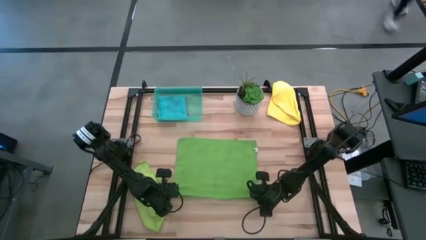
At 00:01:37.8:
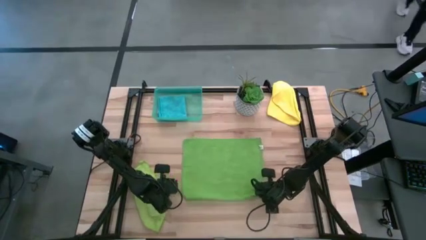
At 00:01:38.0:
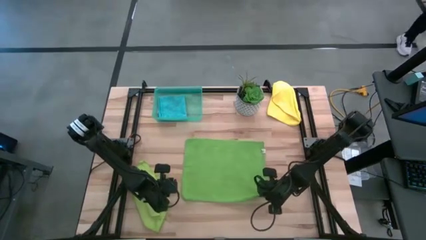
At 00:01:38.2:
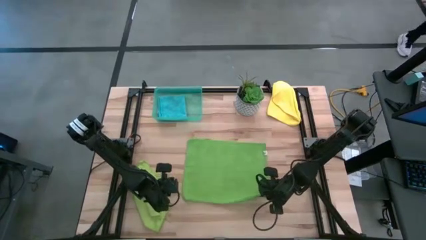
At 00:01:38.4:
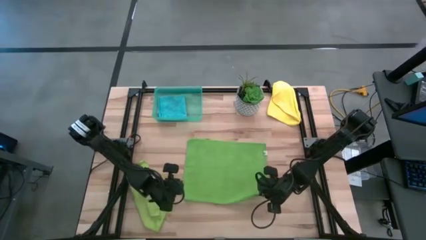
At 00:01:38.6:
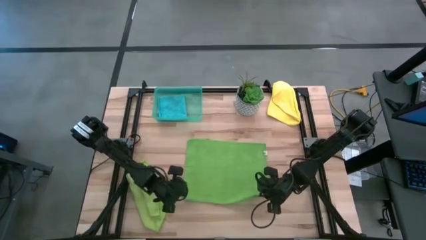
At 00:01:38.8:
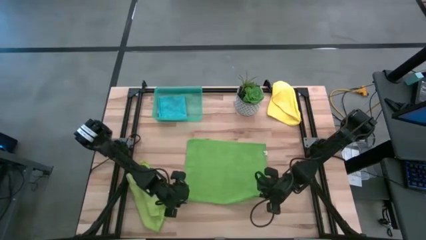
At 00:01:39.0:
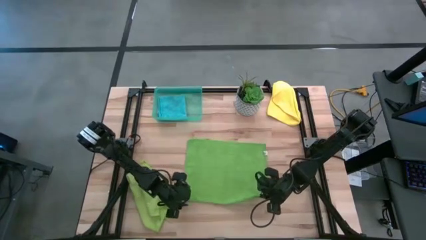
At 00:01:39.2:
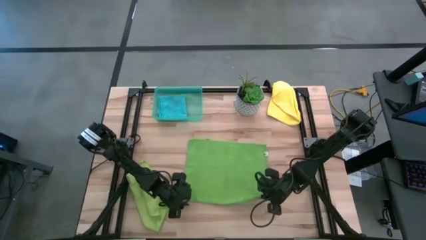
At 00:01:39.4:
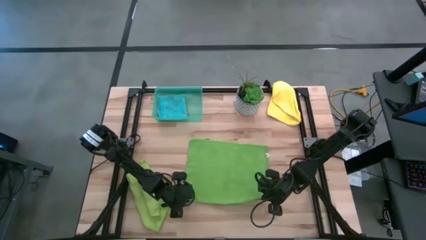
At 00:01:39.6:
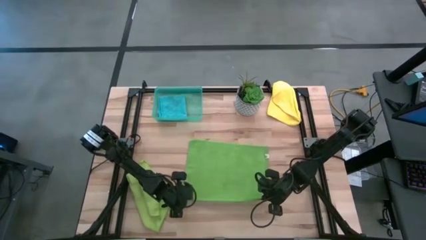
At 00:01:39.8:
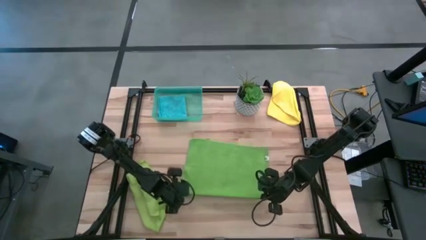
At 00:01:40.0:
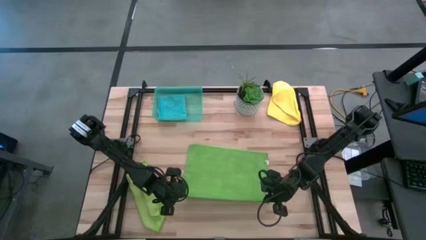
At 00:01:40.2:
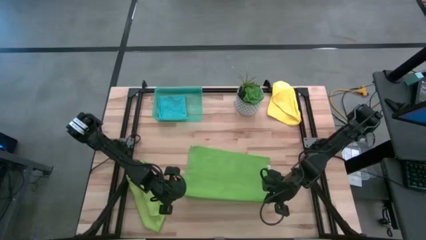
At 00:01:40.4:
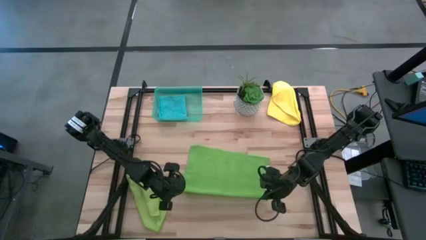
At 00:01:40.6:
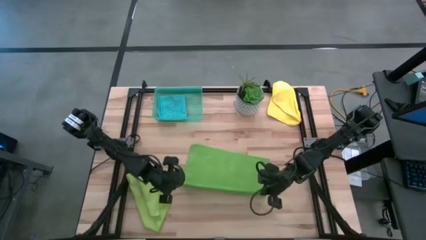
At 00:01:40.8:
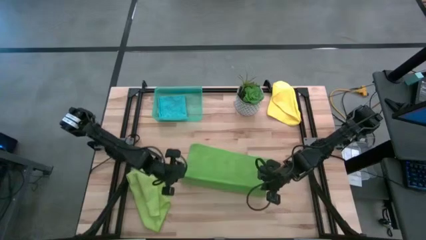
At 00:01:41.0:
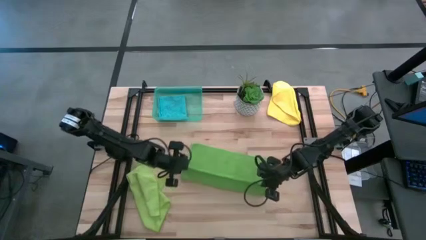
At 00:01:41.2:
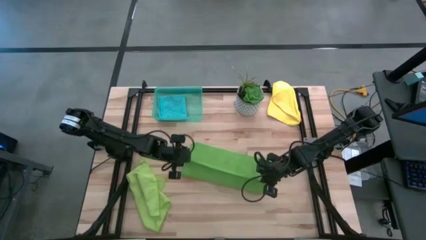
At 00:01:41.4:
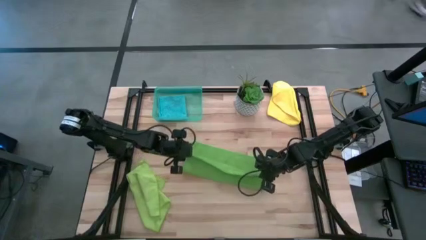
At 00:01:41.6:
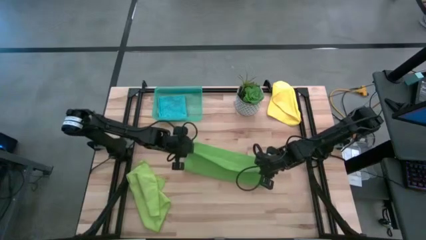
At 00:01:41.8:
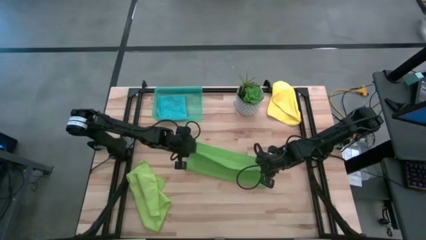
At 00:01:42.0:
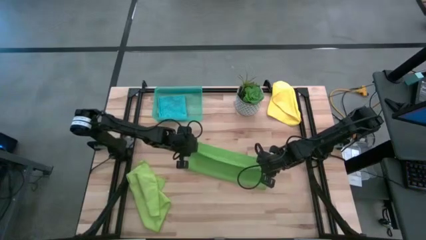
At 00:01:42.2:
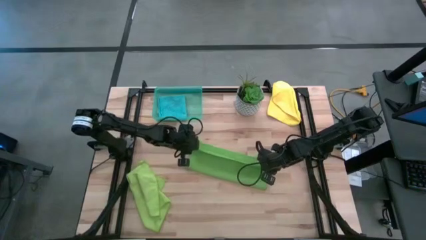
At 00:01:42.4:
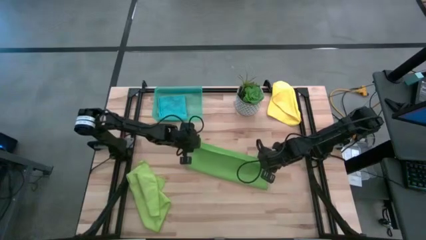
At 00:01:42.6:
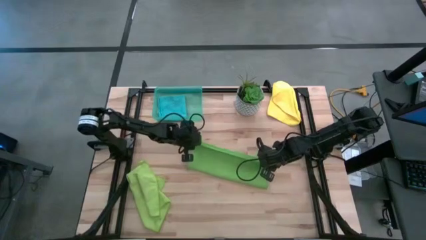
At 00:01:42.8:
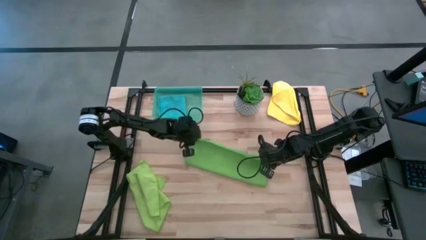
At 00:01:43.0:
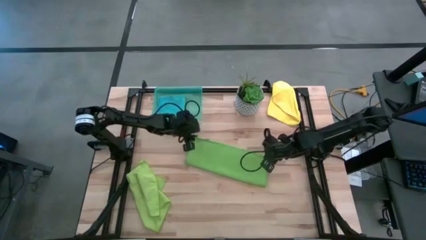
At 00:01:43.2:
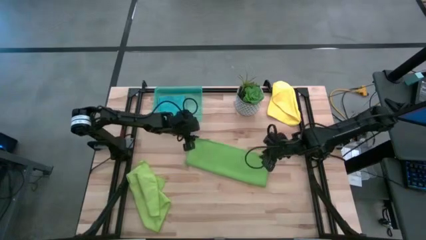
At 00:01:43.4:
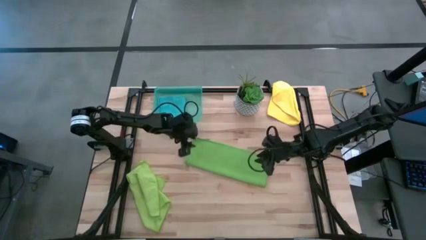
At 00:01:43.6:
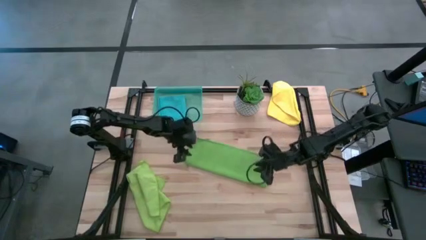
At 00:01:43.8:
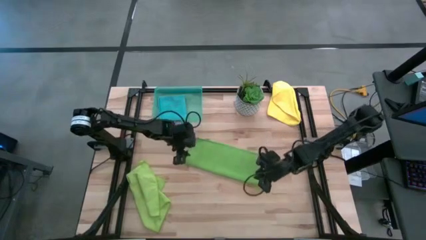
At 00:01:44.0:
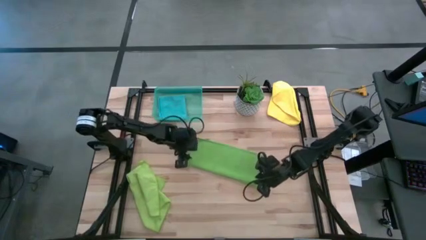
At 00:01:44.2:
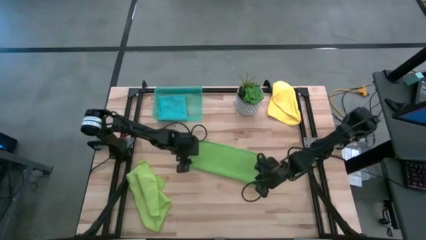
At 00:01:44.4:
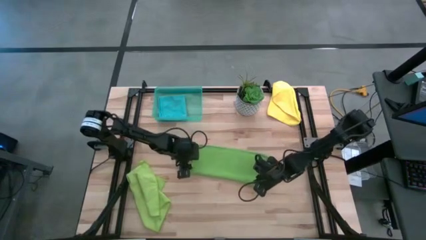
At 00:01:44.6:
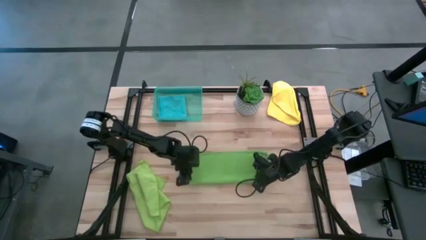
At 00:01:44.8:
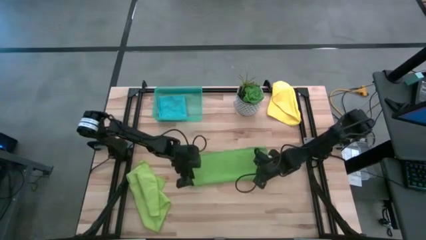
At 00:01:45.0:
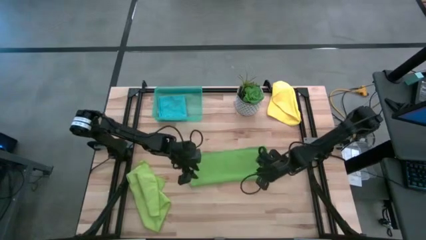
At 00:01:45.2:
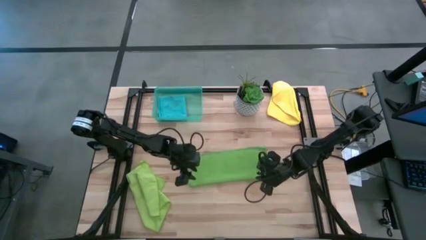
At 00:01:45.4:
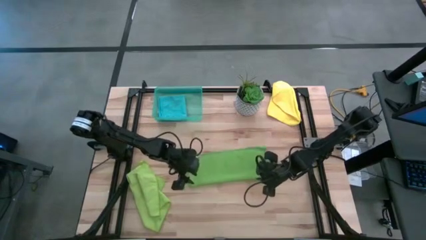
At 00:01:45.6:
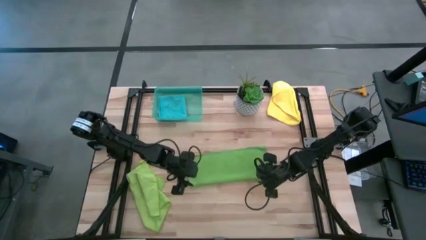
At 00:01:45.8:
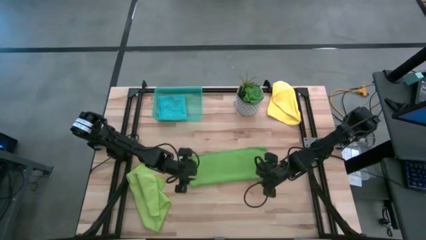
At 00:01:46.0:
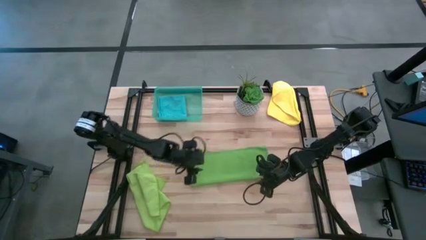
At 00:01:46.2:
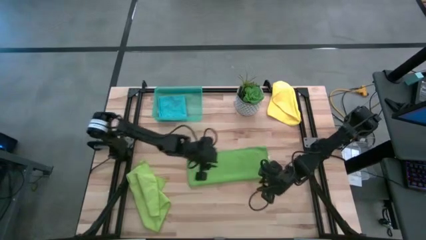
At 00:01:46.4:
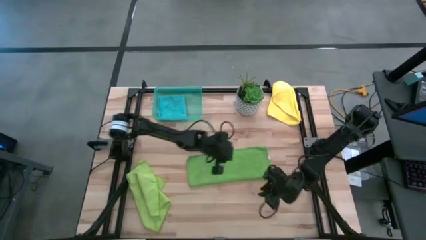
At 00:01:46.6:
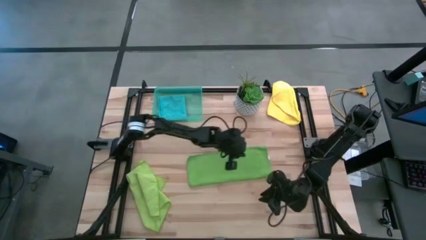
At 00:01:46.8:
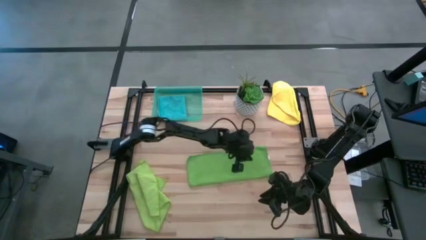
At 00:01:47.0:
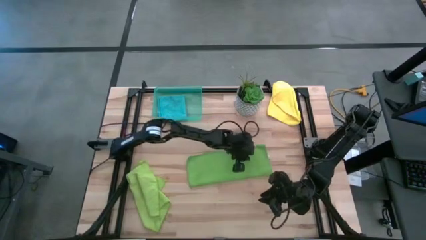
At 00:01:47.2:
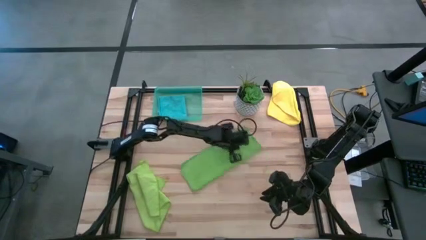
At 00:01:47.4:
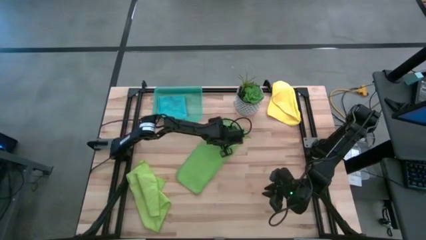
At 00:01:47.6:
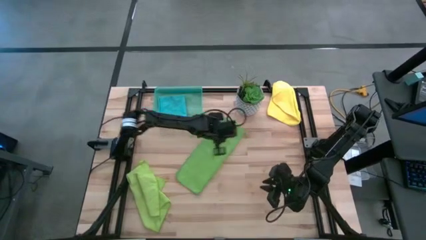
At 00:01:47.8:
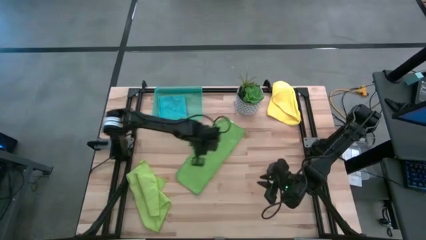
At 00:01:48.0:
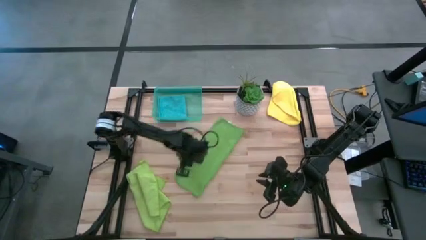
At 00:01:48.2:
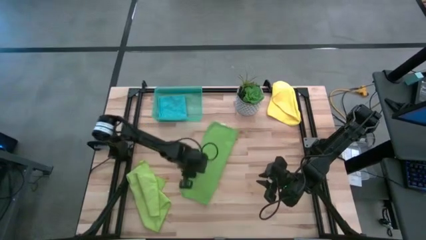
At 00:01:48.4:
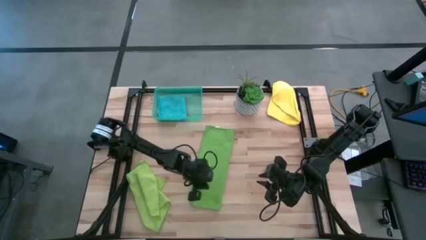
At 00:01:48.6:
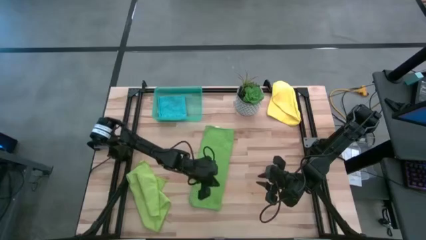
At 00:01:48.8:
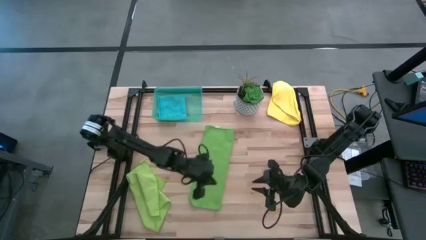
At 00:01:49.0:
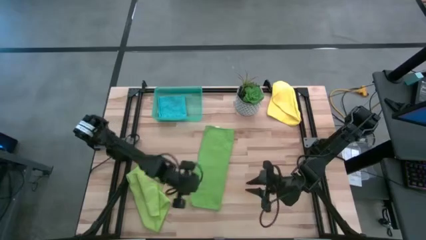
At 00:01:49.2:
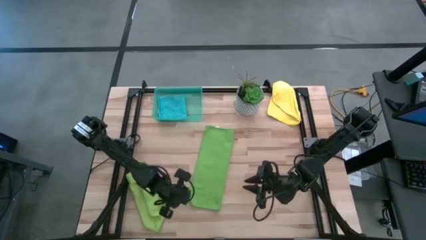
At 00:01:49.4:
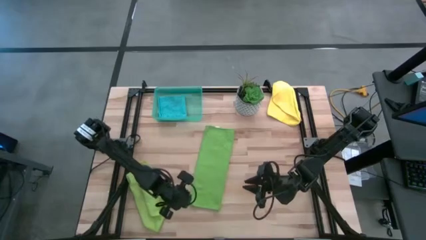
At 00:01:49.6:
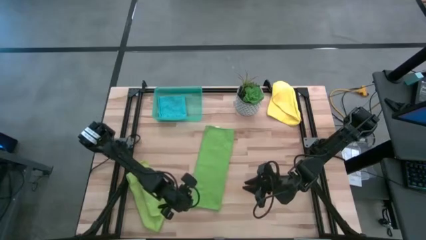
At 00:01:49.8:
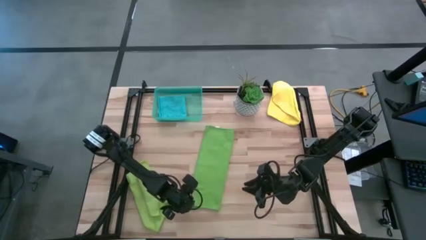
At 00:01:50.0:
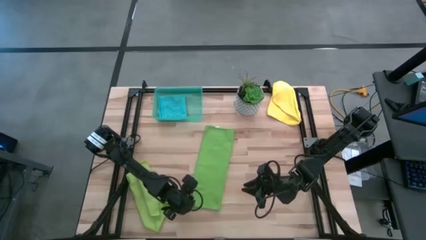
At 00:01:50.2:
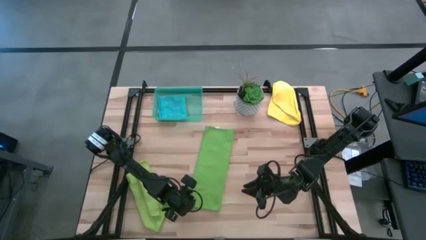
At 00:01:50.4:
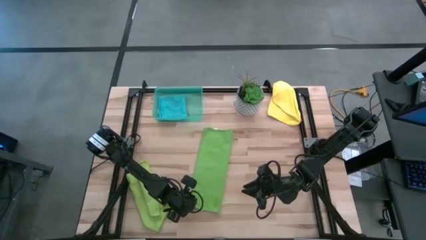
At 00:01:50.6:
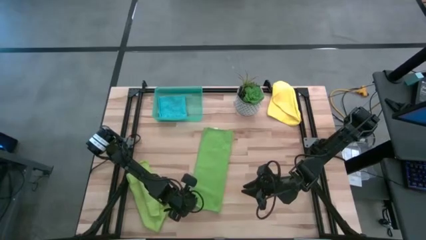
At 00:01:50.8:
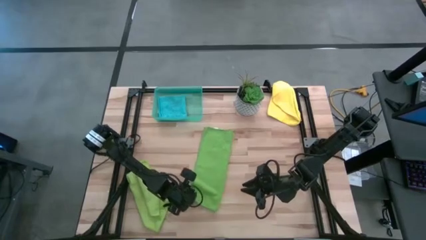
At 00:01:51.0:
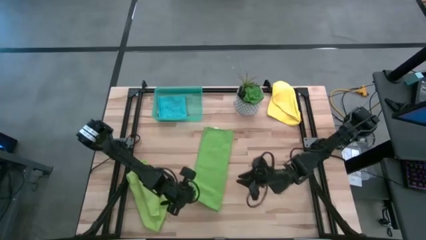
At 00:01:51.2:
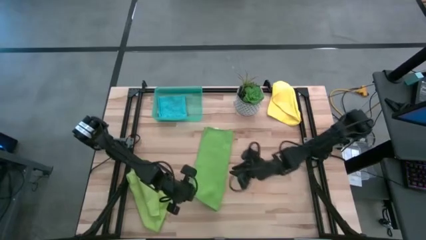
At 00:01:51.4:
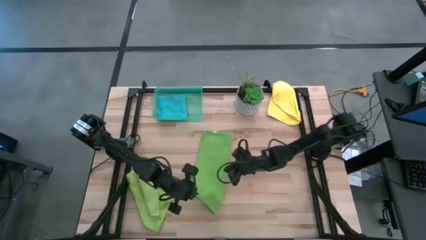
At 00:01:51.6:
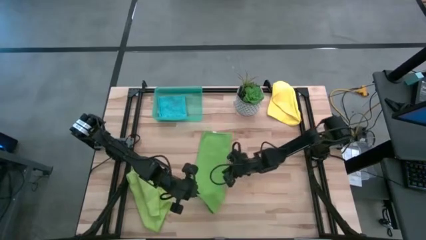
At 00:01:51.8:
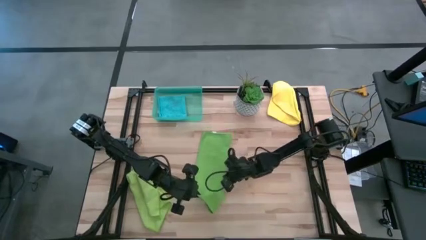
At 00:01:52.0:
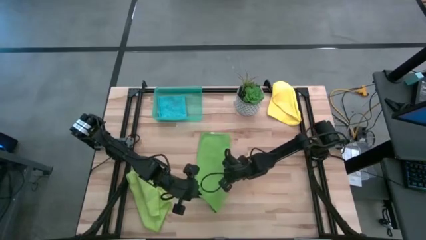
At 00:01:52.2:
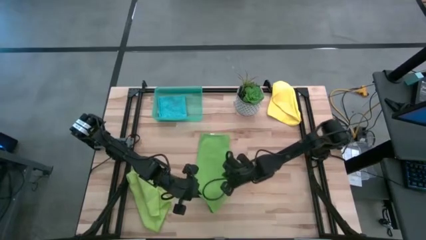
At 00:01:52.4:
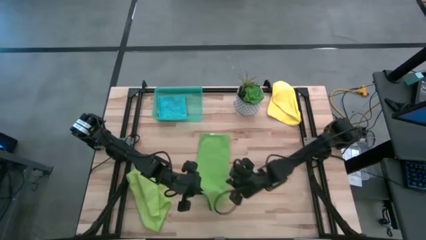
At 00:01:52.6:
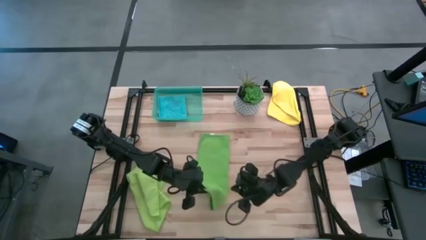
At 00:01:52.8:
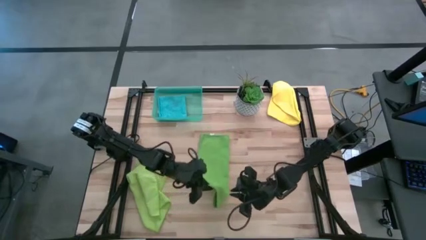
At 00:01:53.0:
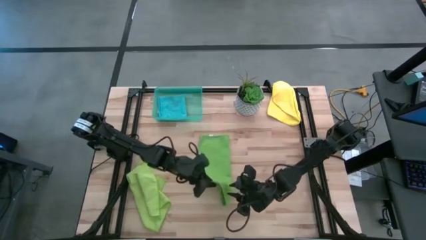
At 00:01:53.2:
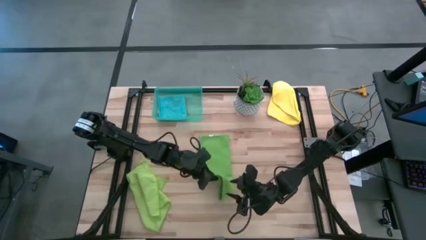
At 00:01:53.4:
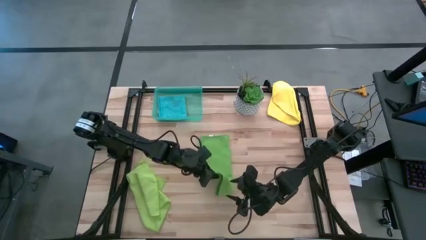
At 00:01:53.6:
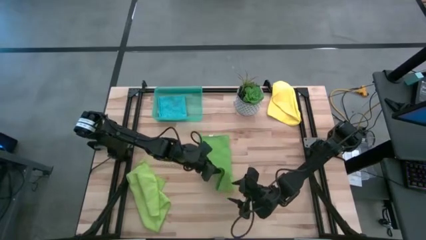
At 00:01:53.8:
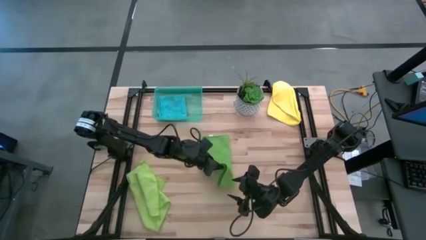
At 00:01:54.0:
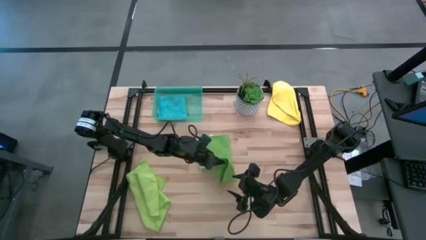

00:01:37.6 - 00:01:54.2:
Task: Fold microfiber towels
Fold the green microfiber cloth
